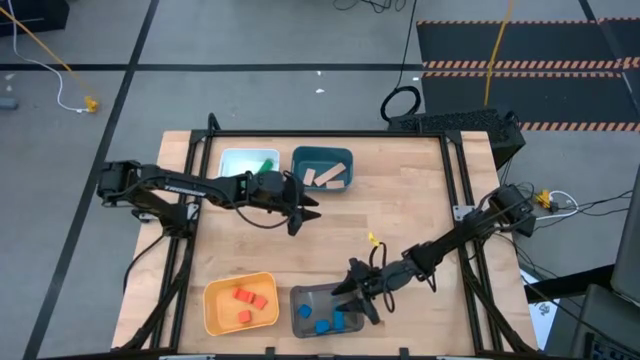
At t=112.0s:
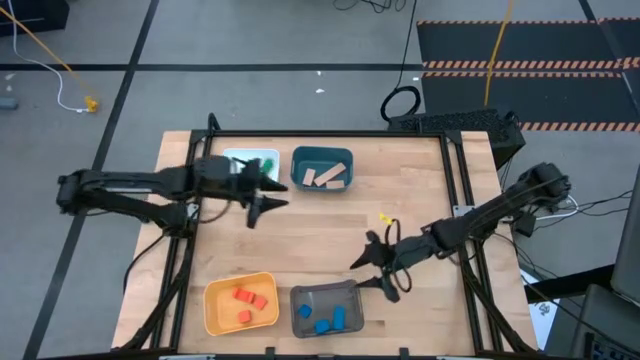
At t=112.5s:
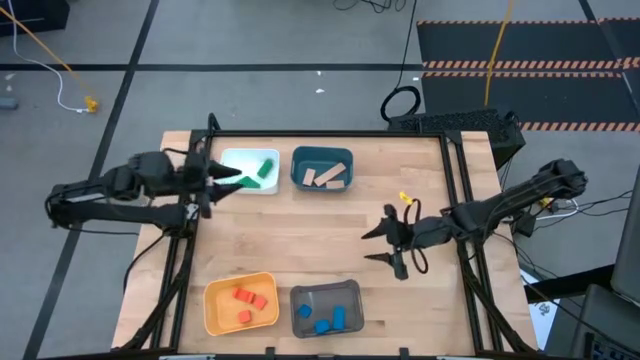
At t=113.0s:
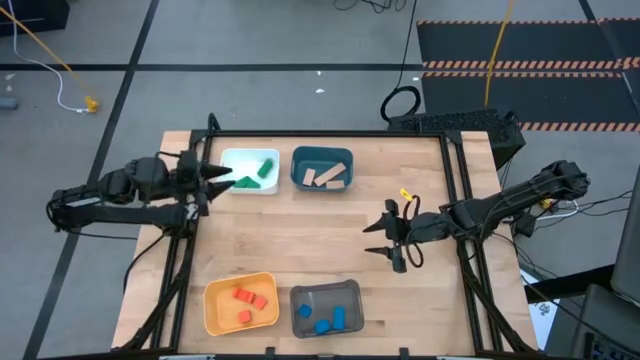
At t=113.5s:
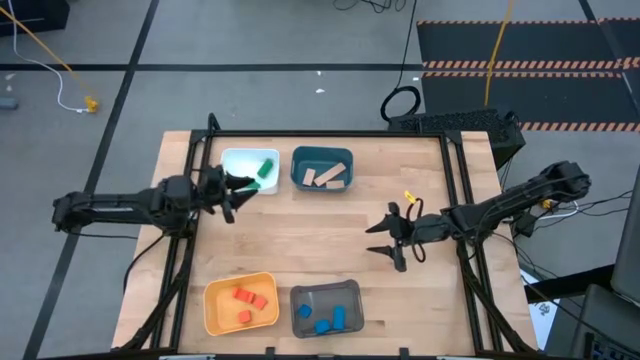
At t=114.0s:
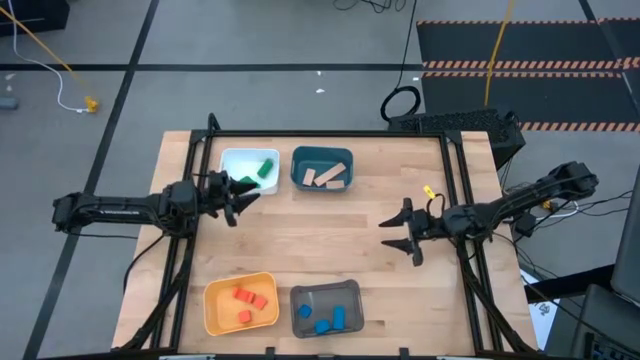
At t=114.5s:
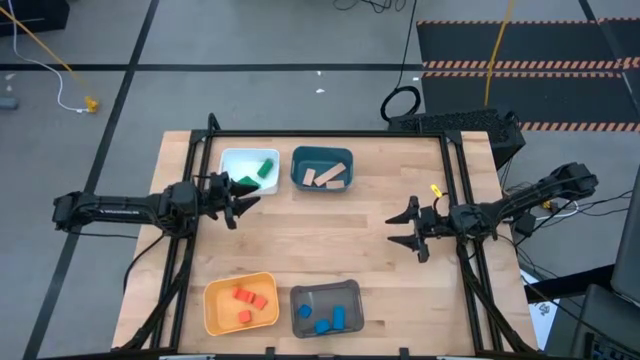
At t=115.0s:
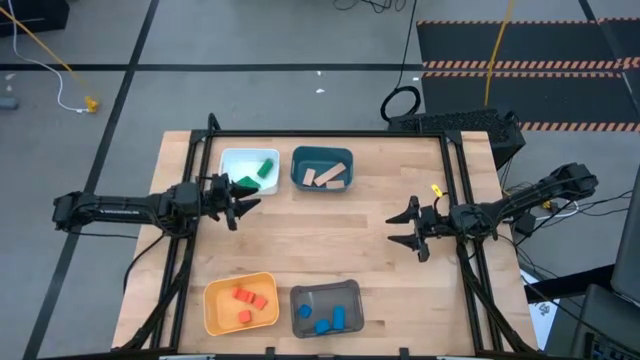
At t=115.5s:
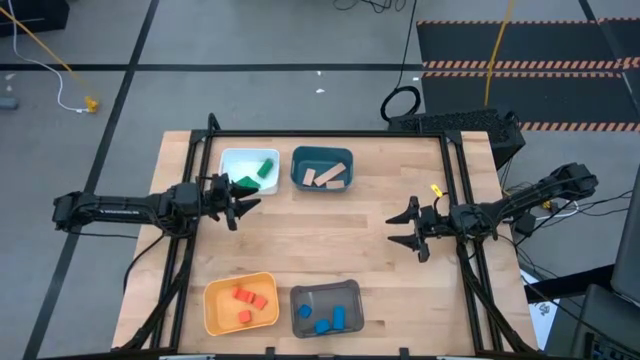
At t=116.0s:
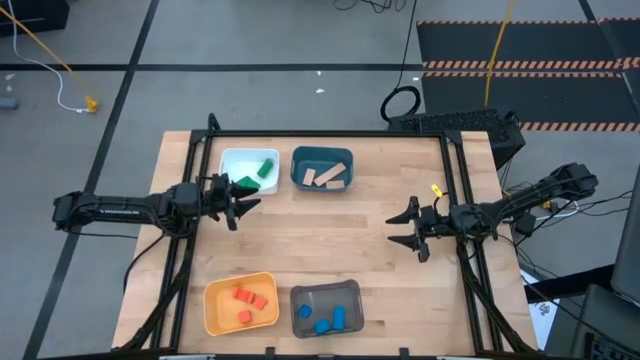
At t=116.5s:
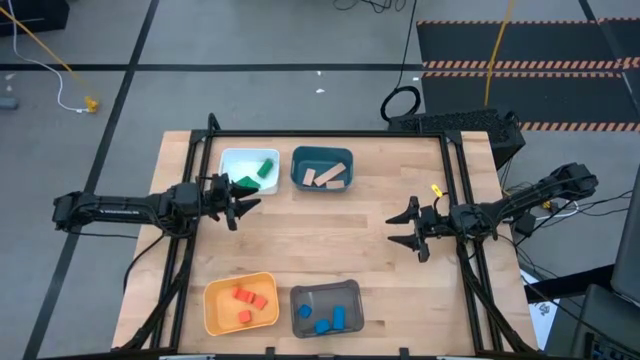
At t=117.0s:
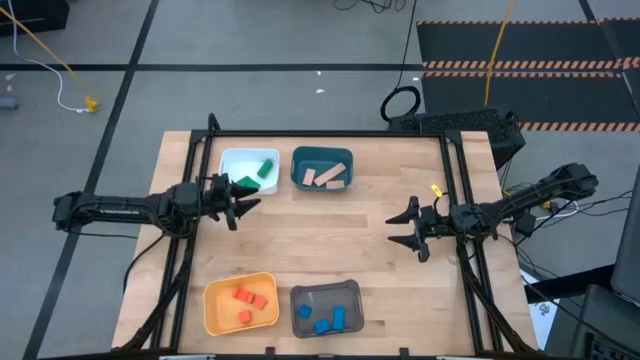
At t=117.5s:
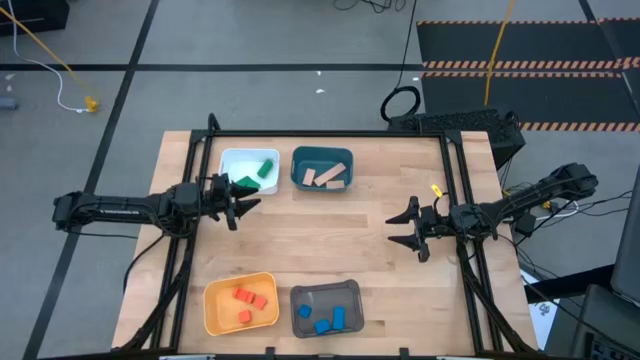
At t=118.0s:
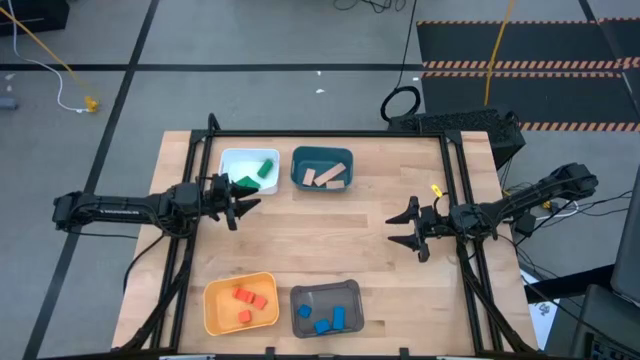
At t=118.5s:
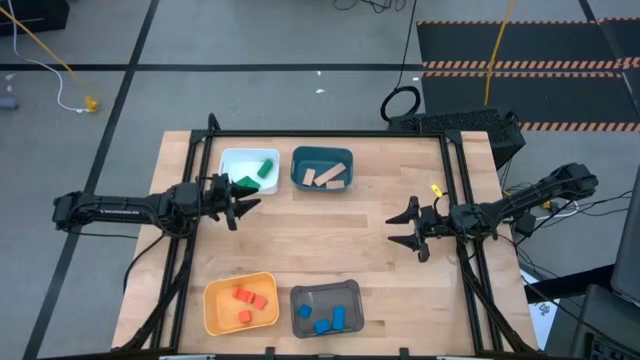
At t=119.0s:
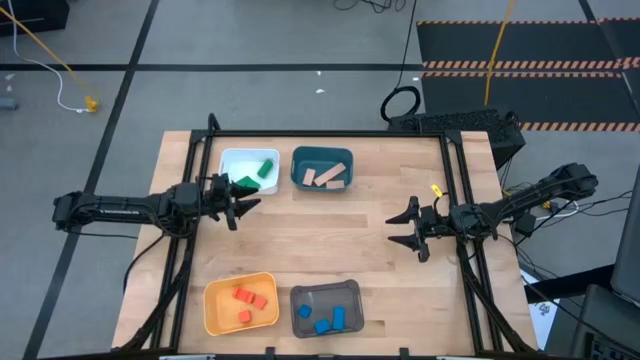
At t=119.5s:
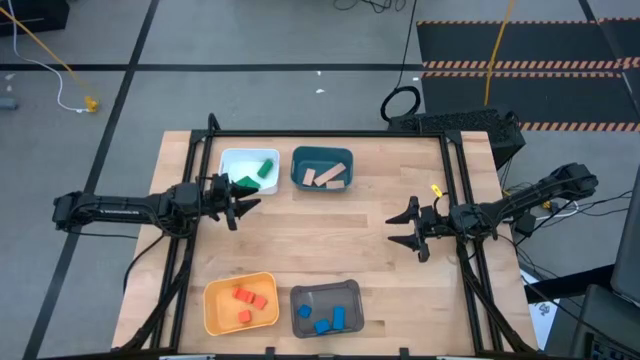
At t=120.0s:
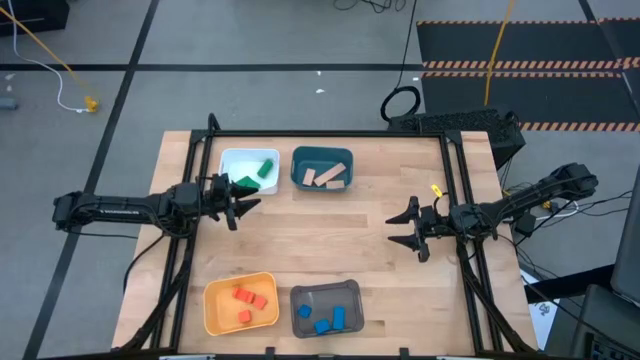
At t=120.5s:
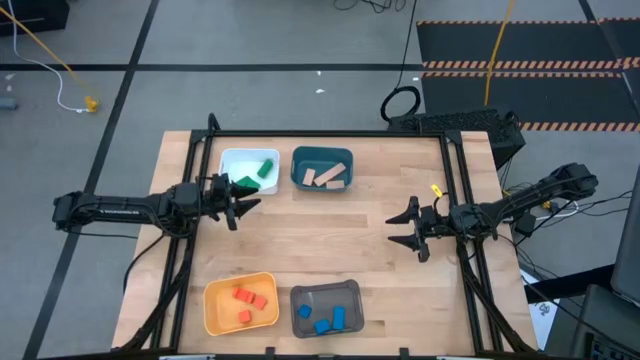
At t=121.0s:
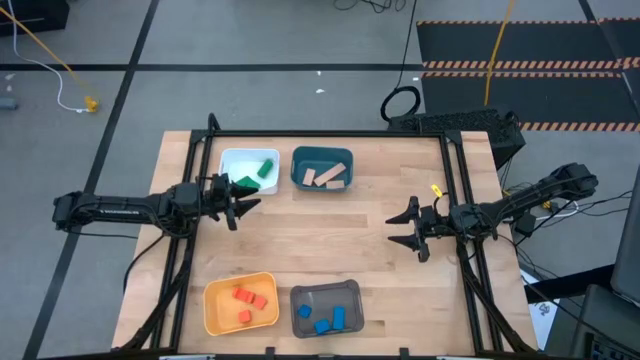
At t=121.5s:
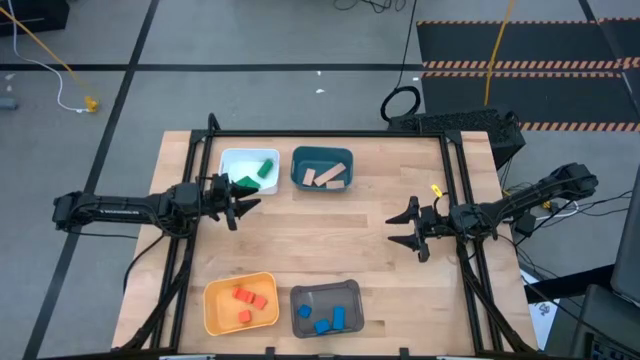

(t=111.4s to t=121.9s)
Task: Sort & place blocks by color
Return to Home Position

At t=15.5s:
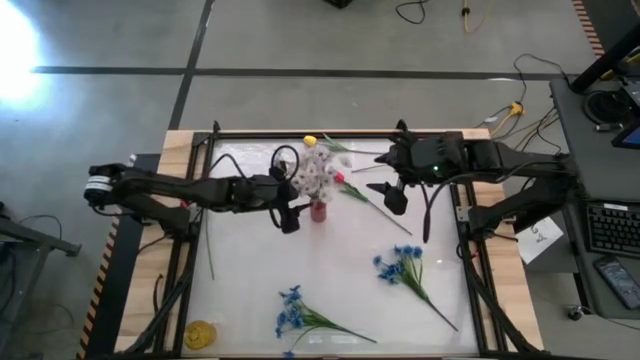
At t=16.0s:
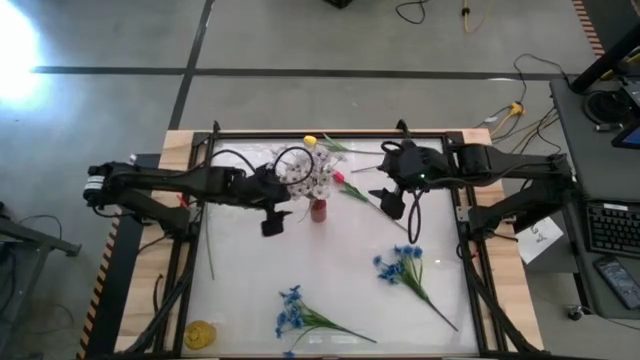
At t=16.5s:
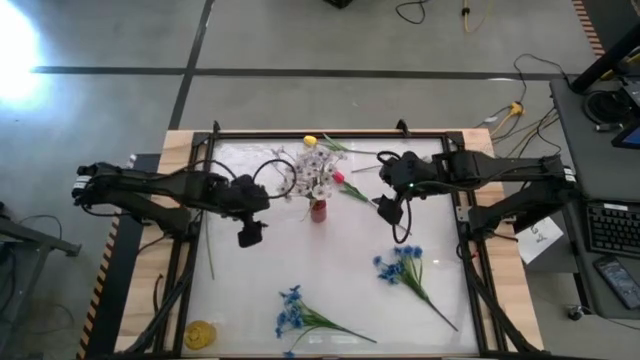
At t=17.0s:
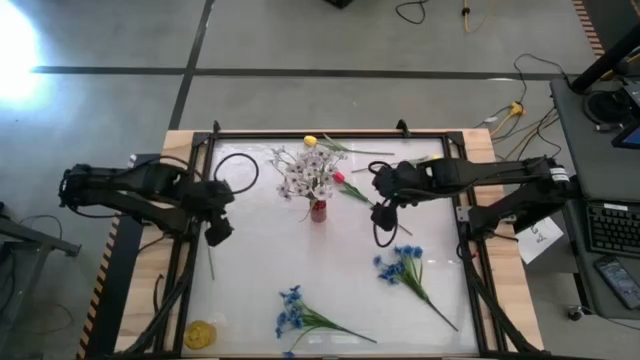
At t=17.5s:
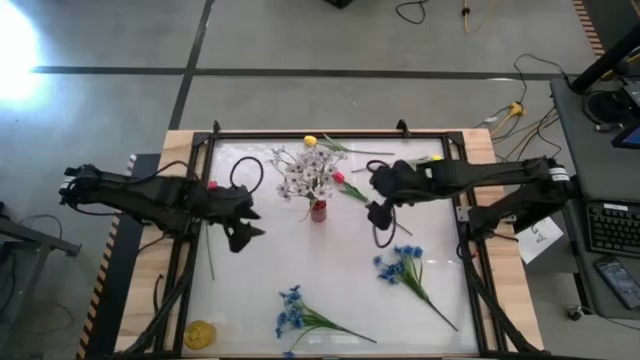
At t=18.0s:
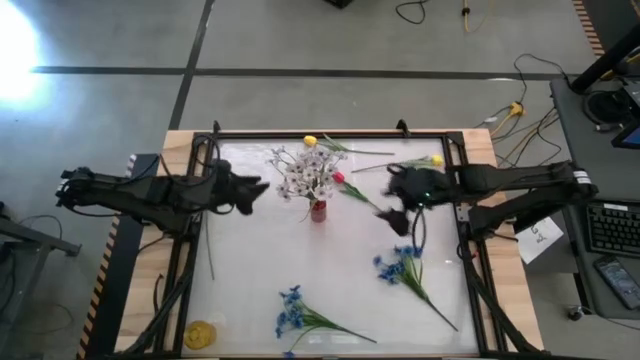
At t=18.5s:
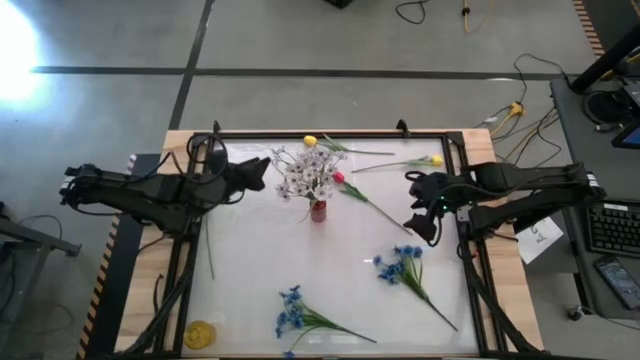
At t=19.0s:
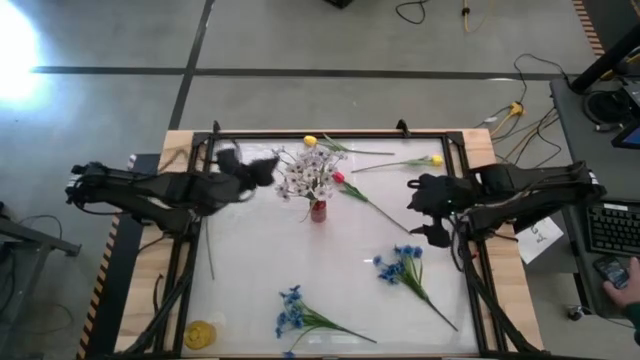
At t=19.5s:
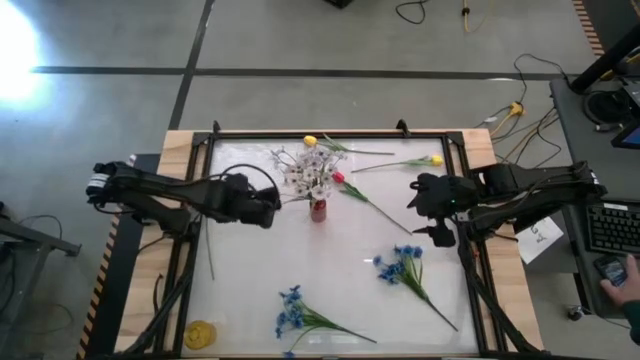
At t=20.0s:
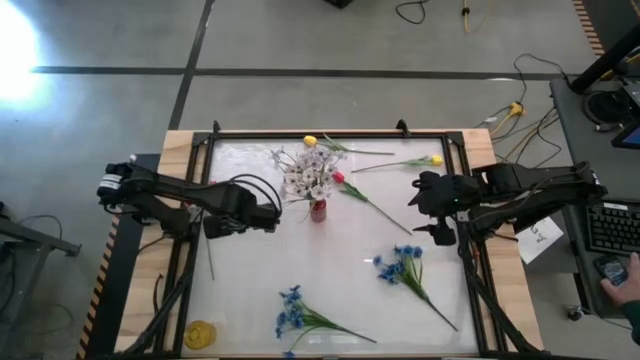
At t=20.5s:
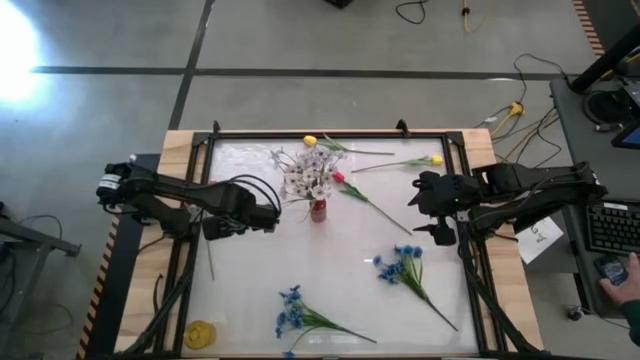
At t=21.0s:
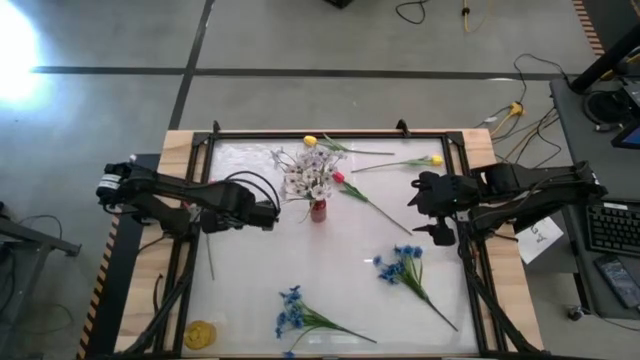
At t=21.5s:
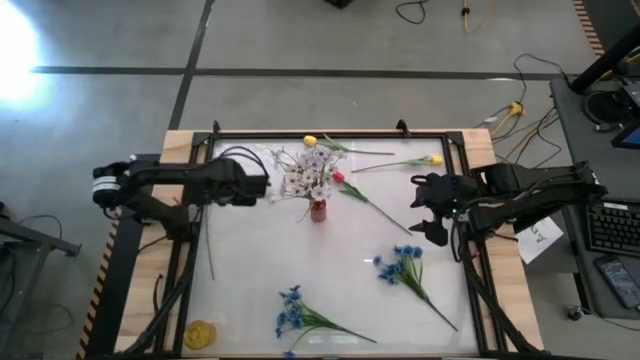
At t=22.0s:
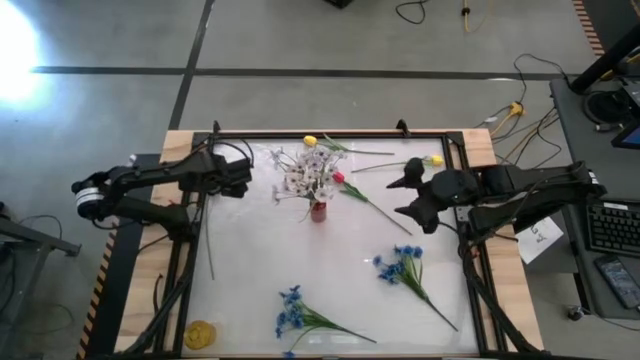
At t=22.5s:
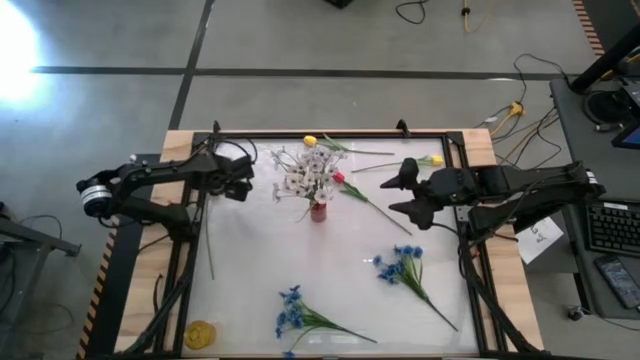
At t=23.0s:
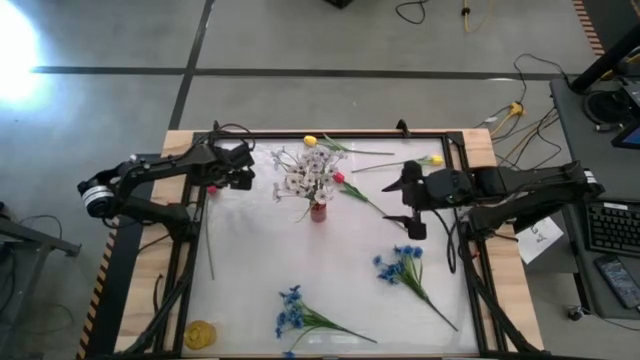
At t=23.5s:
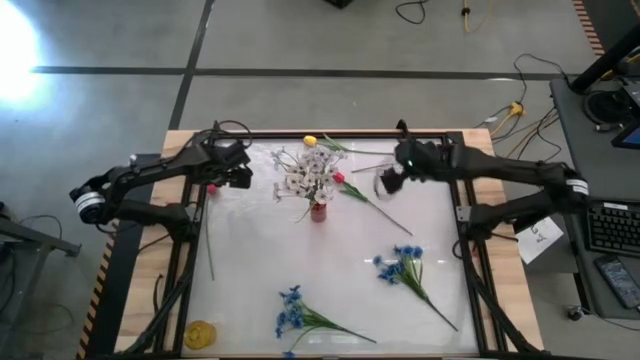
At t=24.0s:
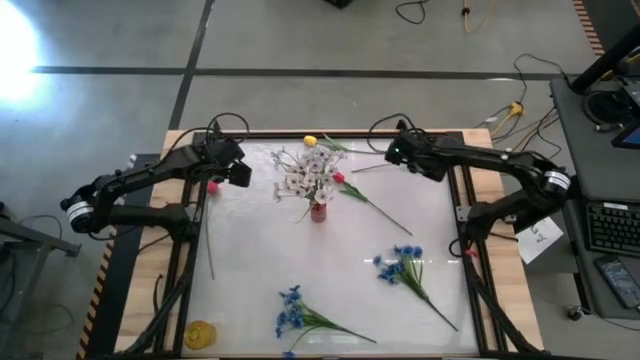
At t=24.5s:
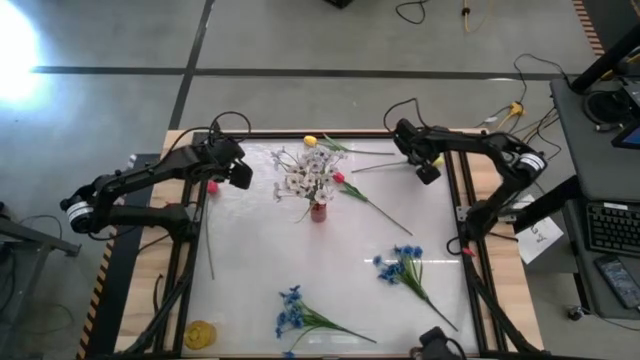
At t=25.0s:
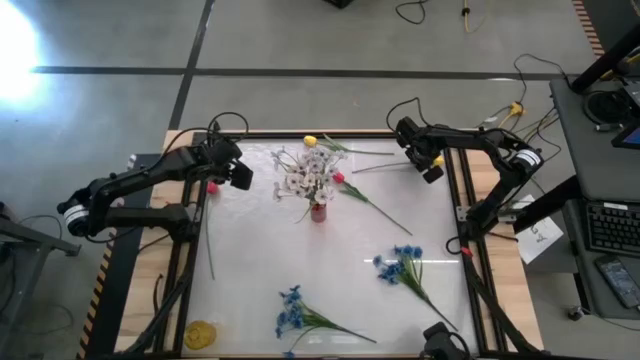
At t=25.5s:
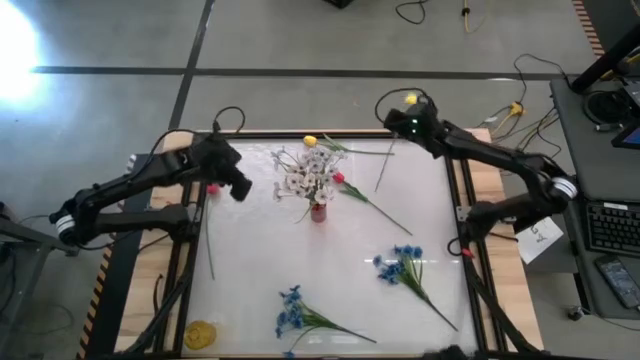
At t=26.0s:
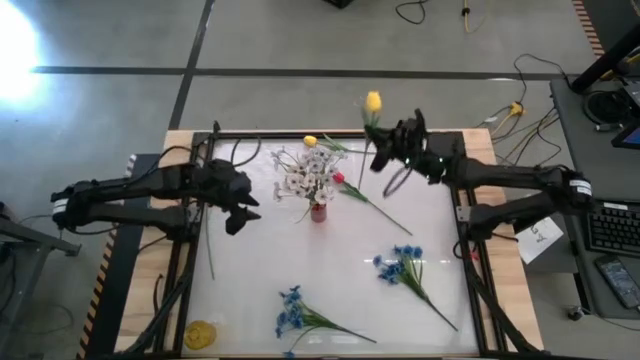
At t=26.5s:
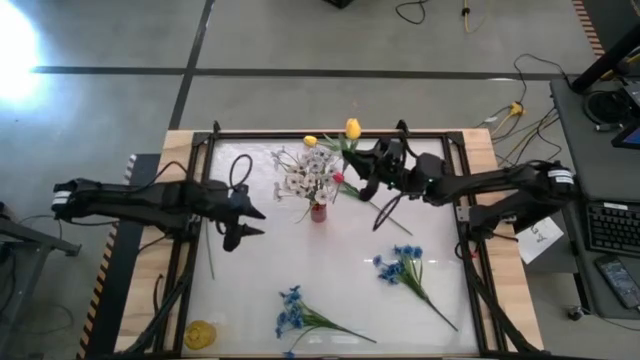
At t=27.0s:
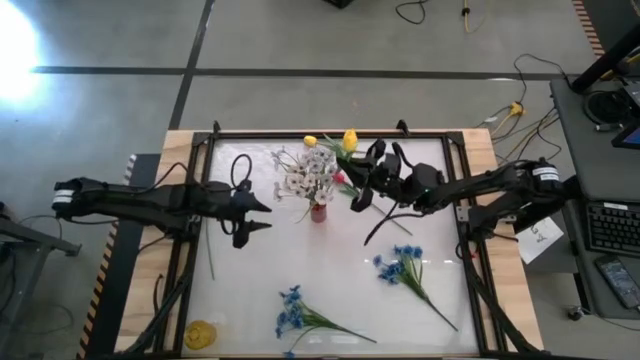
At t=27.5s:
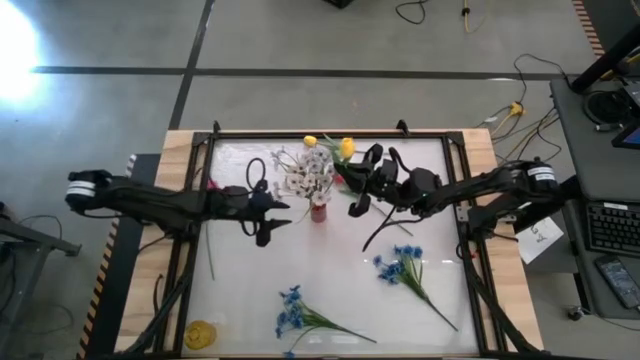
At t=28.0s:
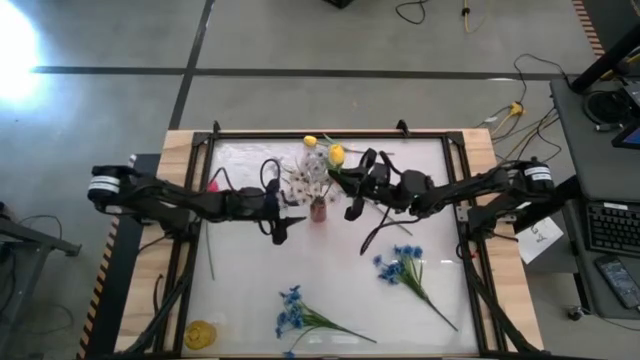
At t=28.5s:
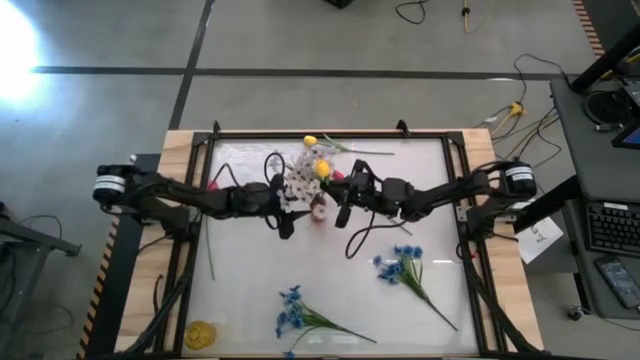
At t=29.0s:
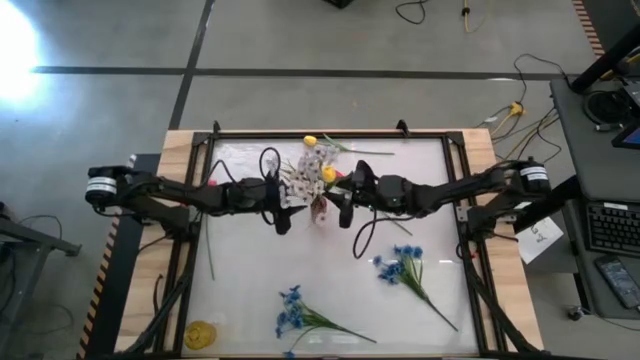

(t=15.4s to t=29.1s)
Task: Sort flowers into vase by color
Put the right yellow tulip into the red flower vase
